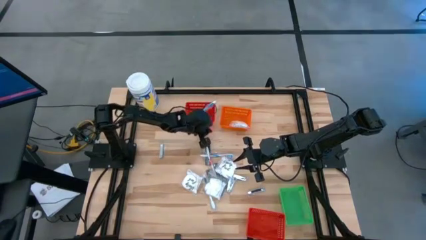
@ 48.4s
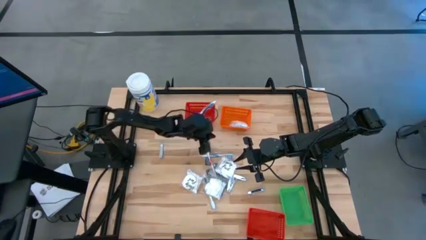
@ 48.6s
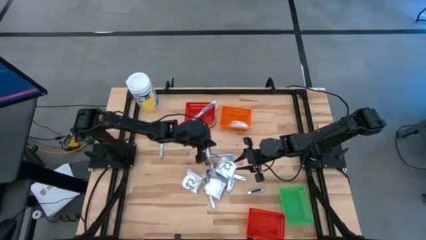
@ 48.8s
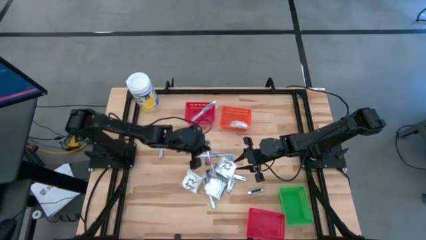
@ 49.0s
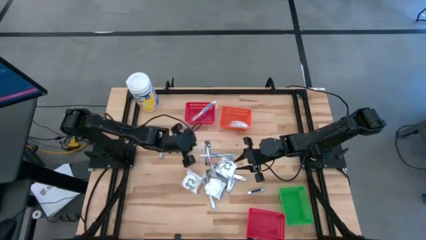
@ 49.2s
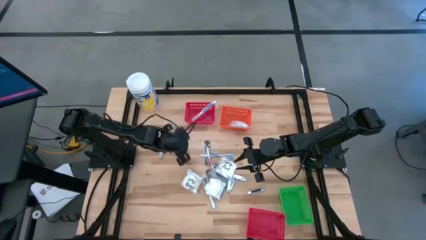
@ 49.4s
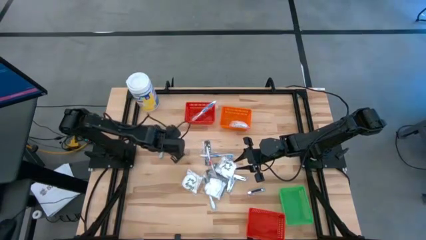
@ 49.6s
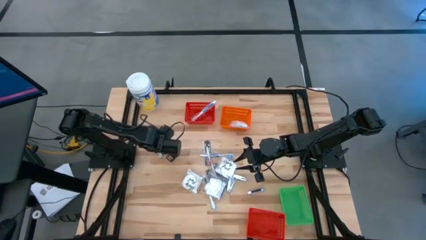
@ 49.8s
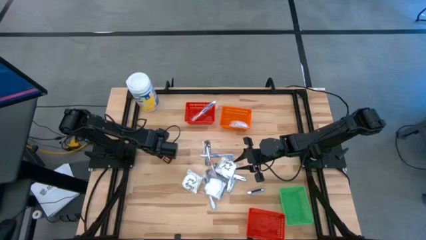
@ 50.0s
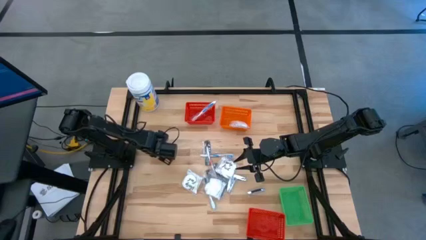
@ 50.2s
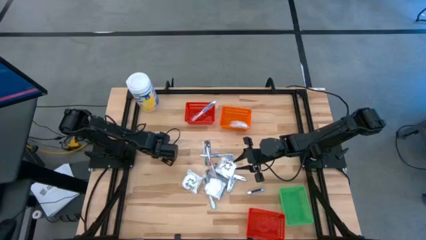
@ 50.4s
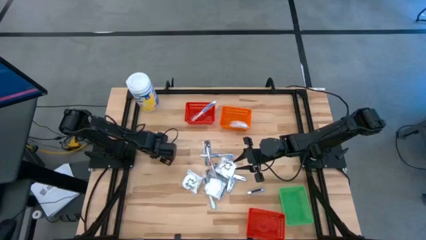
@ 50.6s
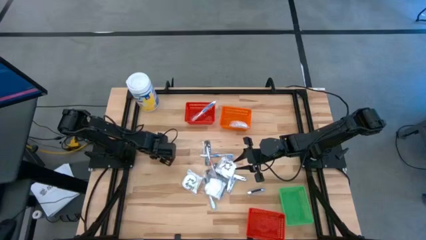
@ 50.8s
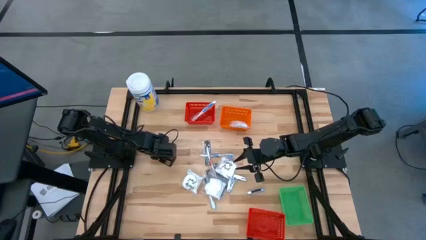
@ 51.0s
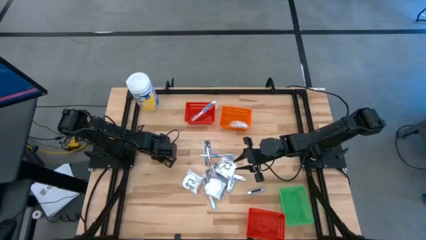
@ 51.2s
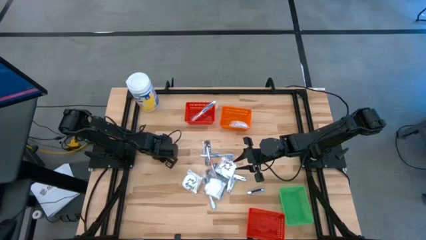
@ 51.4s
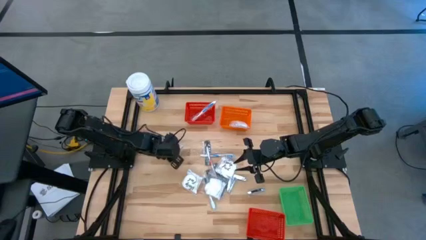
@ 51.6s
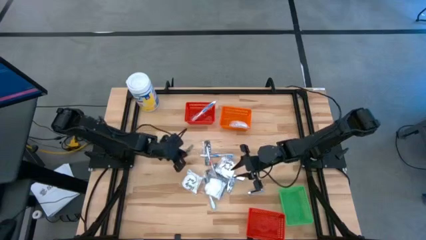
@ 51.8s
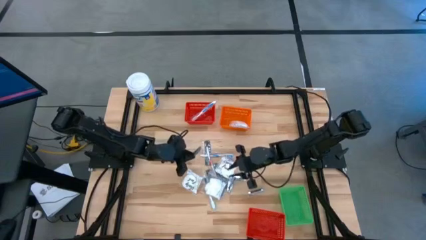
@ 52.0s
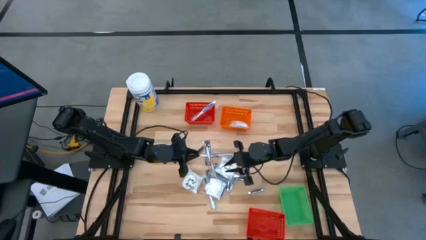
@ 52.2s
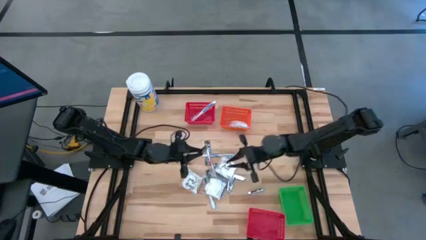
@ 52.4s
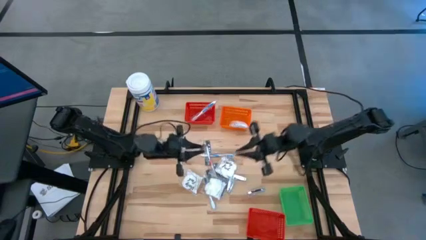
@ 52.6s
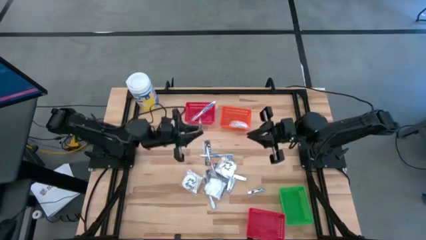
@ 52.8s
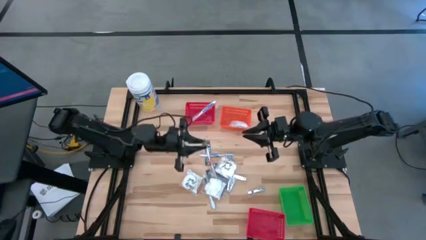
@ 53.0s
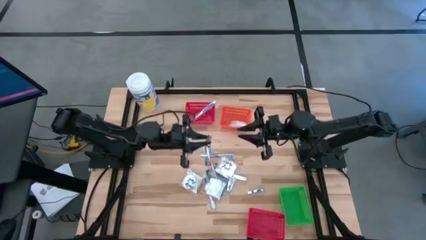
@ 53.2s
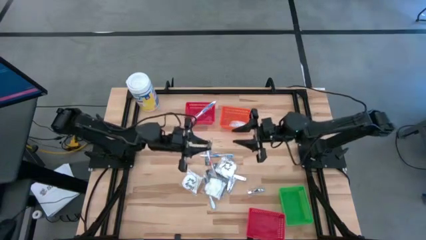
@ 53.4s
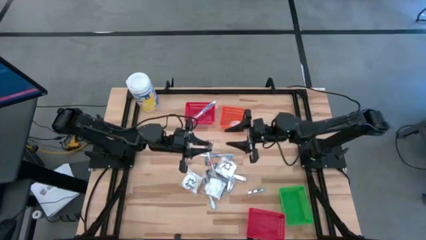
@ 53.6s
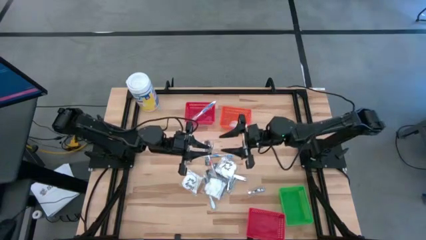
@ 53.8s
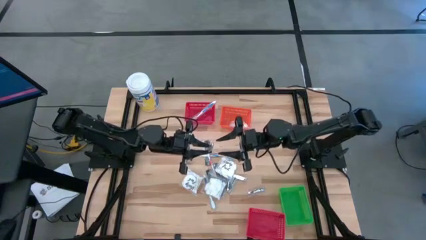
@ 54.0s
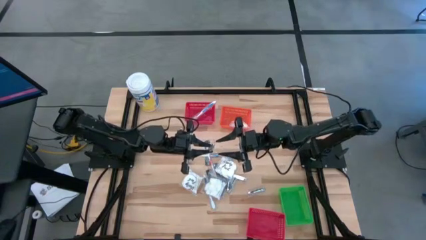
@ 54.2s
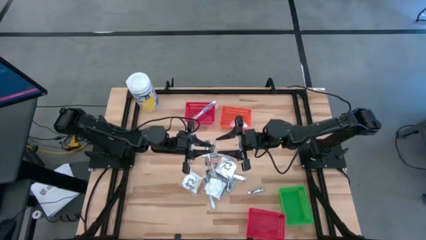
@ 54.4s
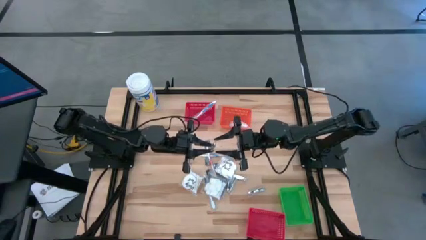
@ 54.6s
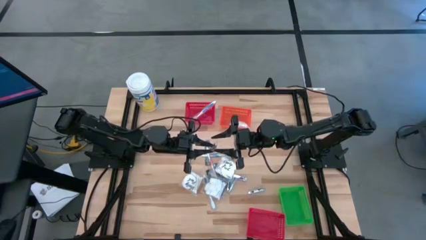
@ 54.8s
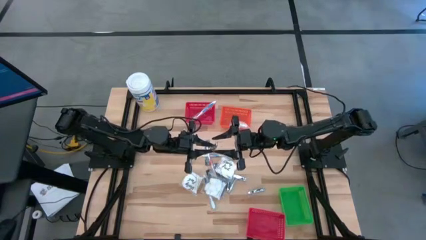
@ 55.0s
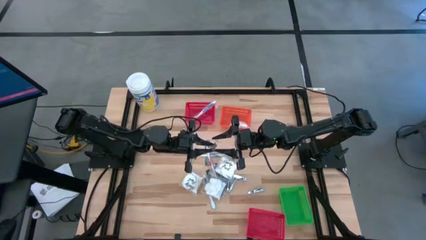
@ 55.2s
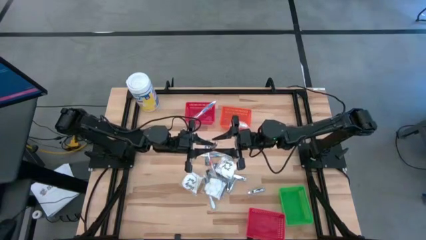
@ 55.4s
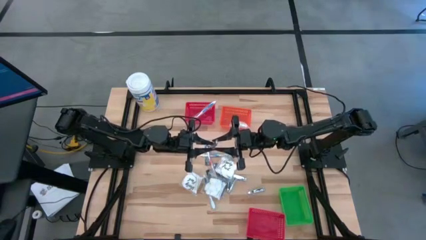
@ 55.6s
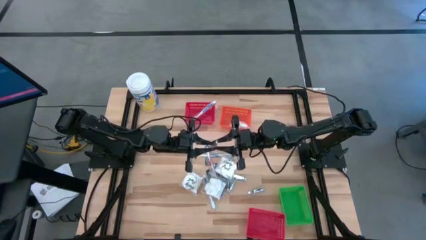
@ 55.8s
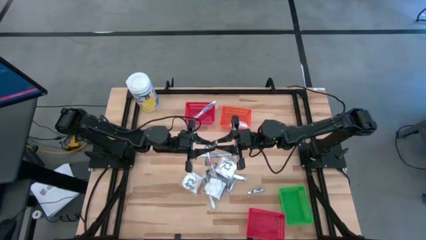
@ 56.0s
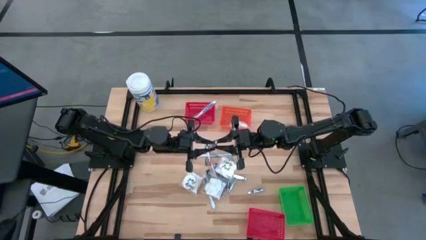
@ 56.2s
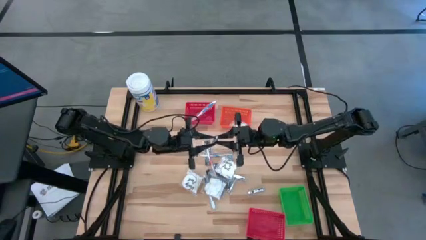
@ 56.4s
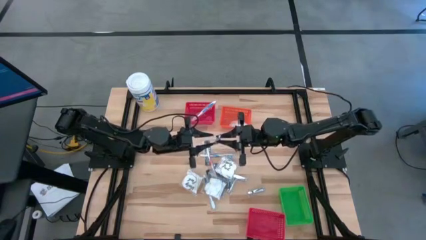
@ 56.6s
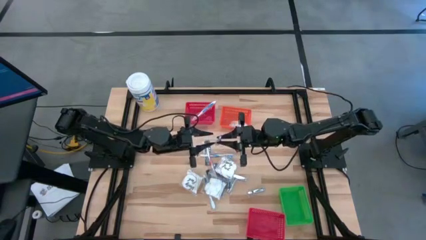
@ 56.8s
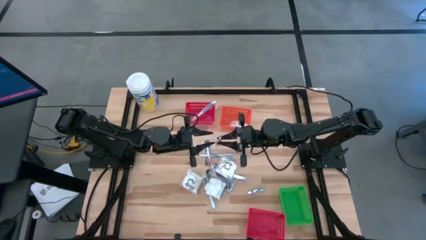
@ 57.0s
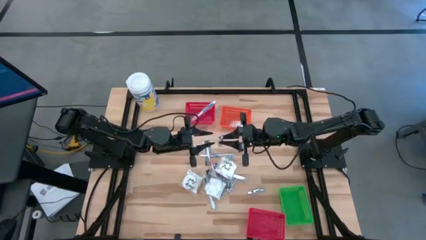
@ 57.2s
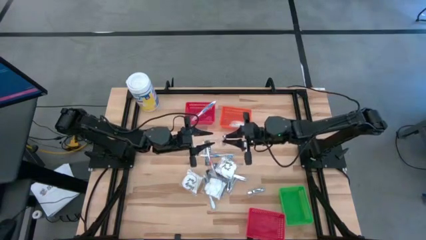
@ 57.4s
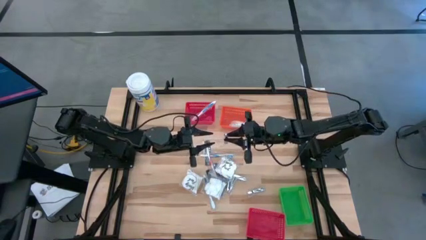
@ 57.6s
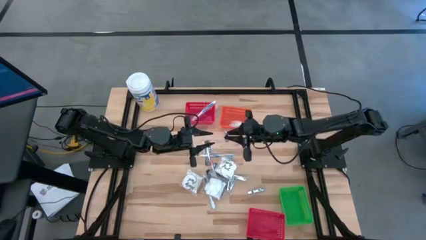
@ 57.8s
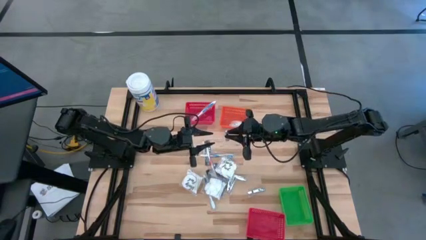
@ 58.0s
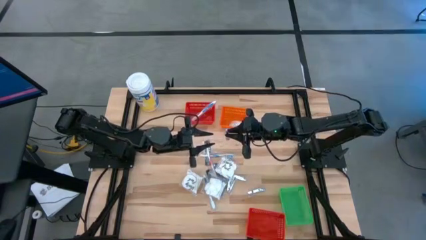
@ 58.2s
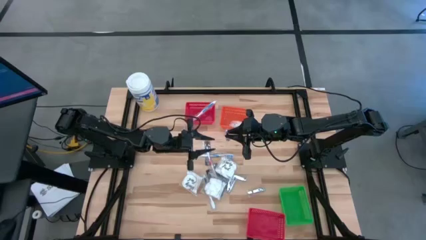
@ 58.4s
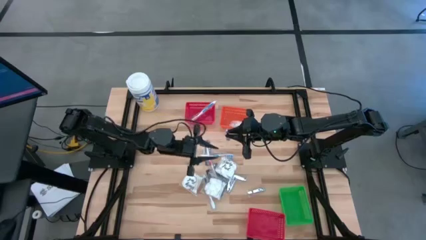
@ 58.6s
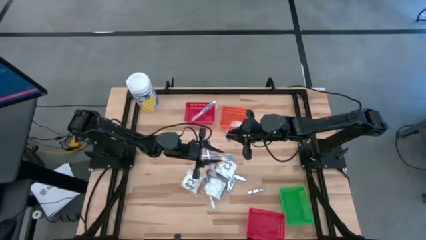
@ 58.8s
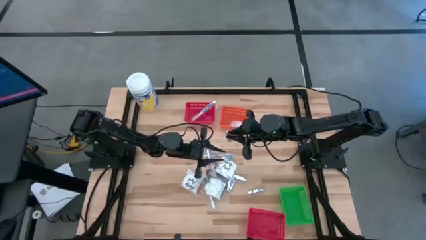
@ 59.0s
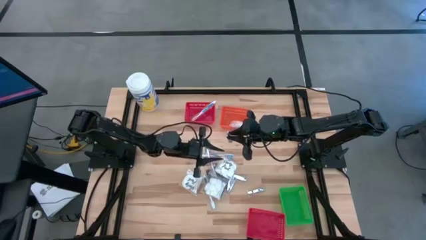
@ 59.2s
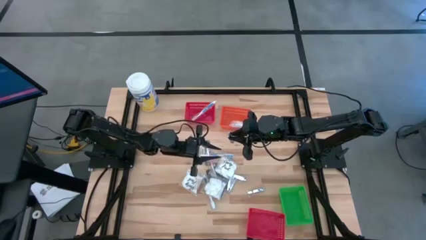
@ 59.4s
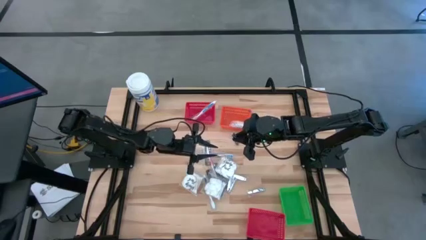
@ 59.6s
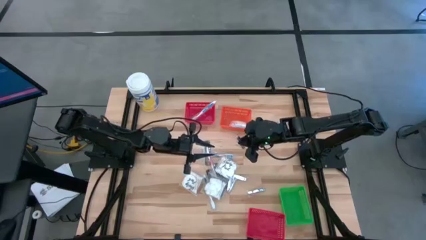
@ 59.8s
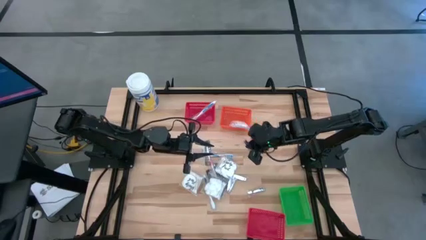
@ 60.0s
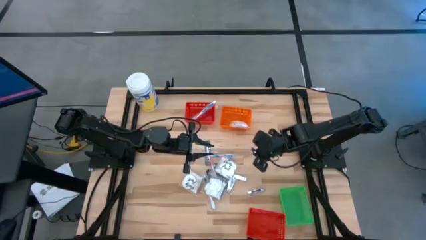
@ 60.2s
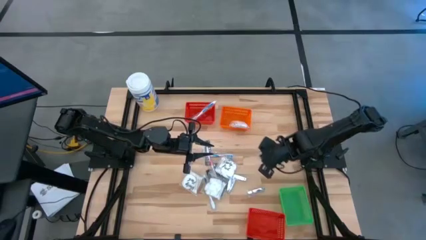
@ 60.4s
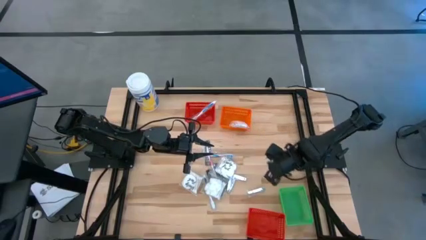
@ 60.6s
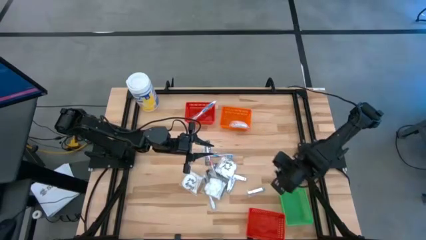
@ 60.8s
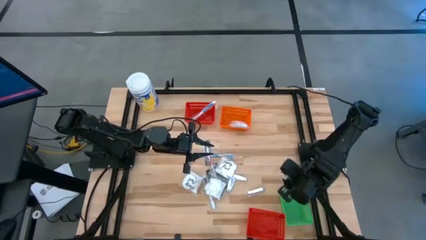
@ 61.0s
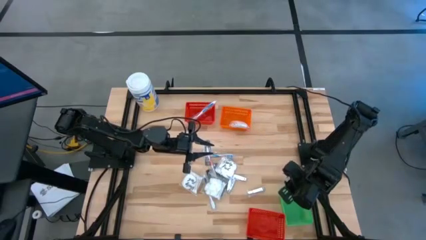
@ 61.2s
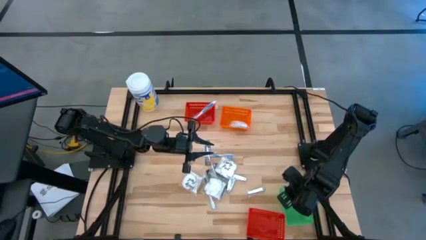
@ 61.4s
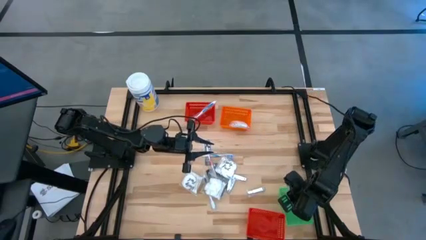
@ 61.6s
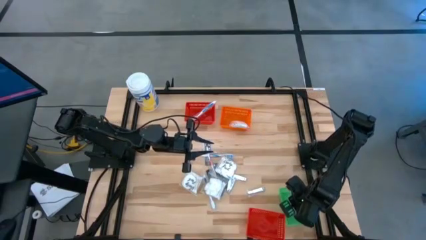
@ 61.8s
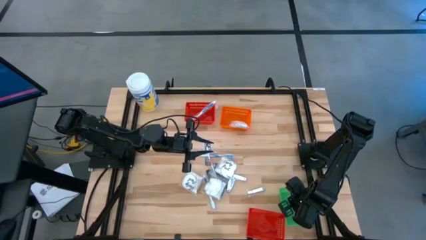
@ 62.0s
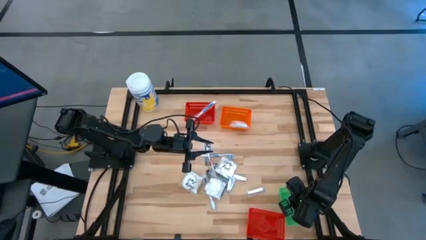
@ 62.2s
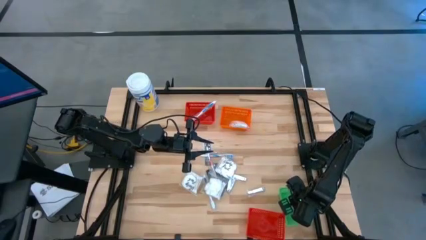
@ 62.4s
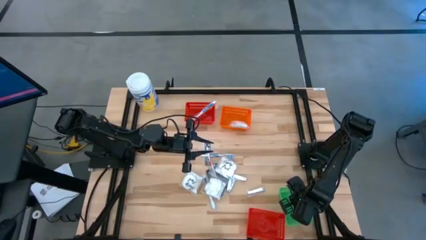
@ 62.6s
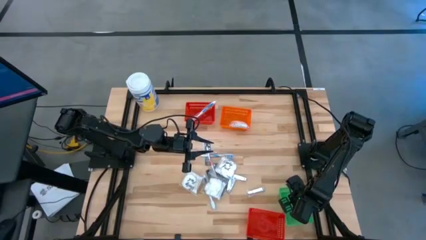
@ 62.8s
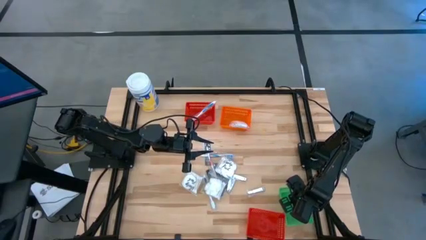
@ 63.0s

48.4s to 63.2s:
Task: Pick & Place Travel size toiletries
Put the silver nail cutter into the green bin

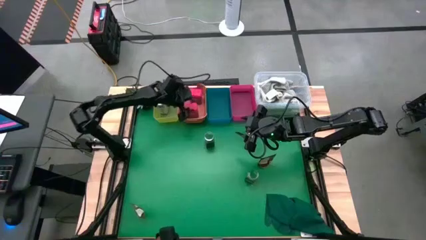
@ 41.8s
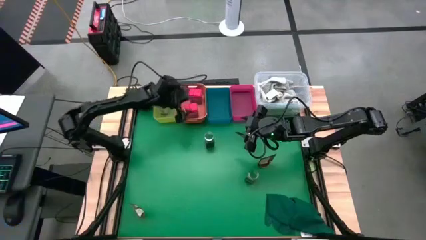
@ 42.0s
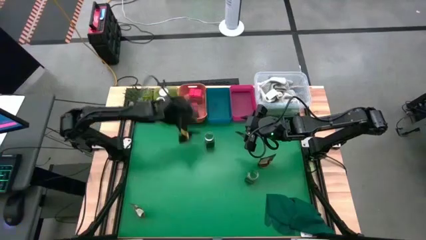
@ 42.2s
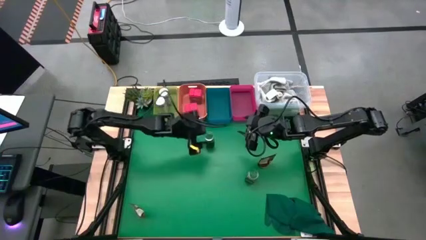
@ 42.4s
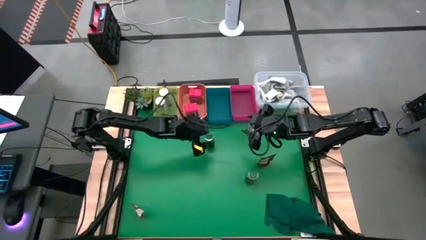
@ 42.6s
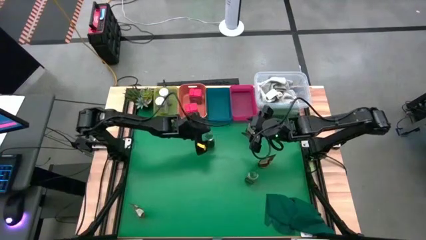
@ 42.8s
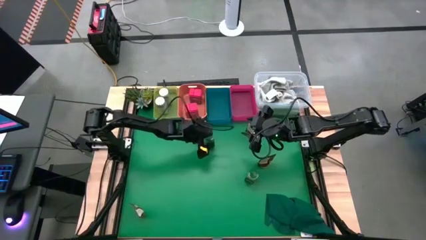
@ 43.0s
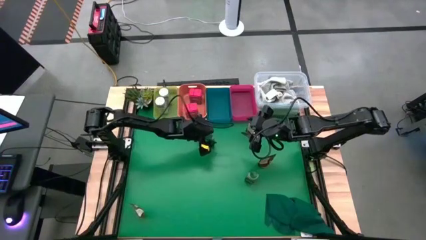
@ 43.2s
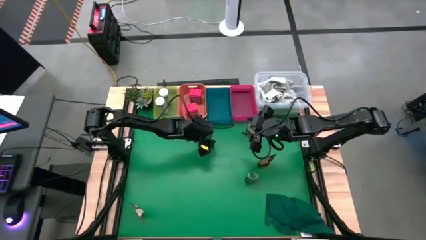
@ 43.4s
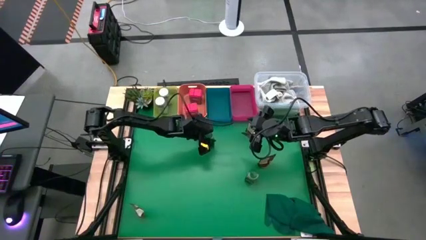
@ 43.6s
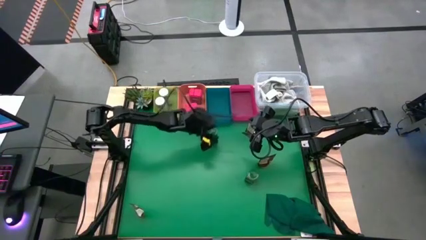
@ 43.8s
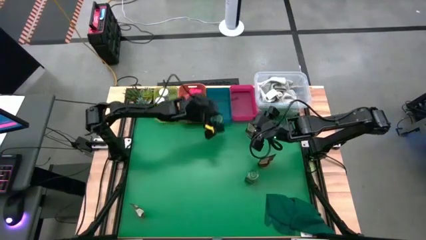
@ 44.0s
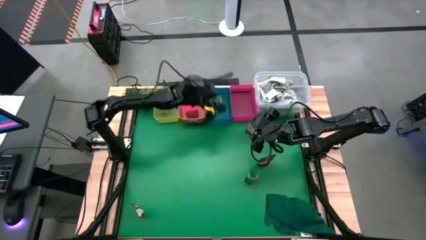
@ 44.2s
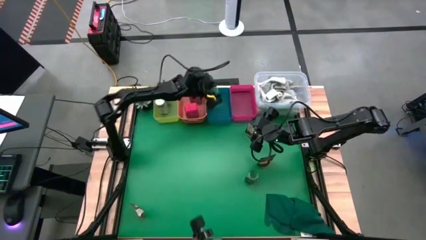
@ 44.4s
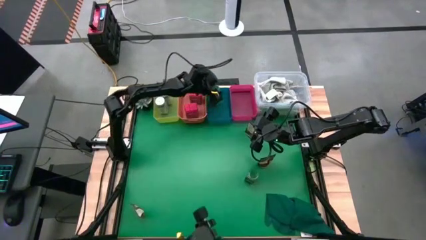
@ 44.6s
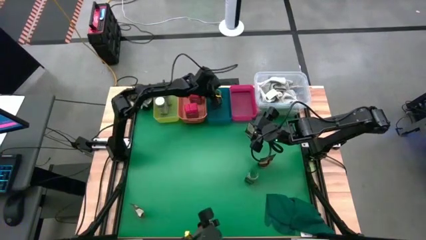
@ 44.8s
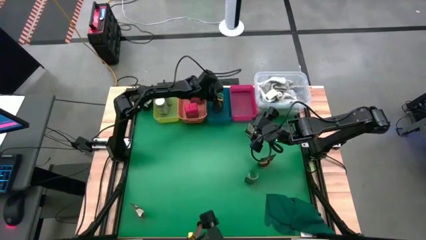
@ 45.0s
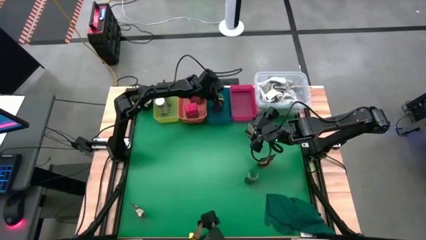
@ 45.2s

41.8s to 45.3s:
Task: Sort spices by type
Put the top green seasoning bottle into the blue bin
